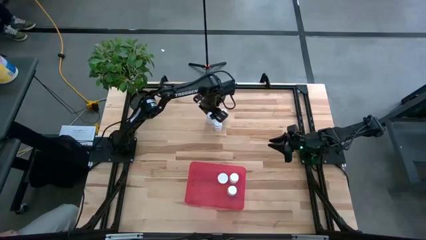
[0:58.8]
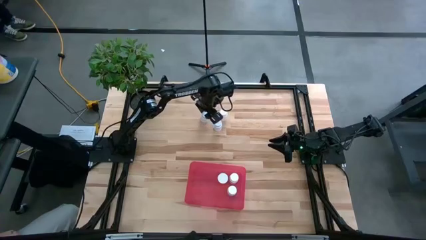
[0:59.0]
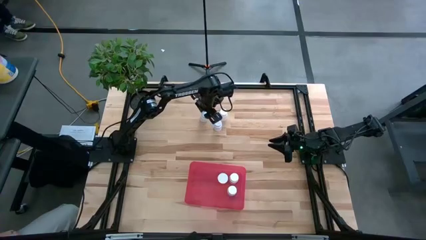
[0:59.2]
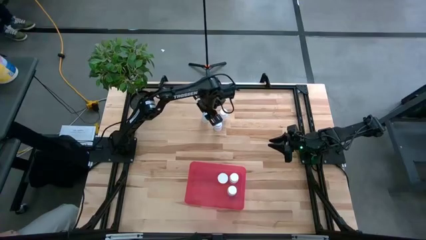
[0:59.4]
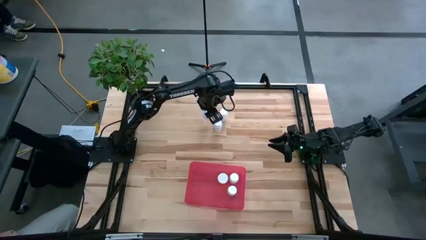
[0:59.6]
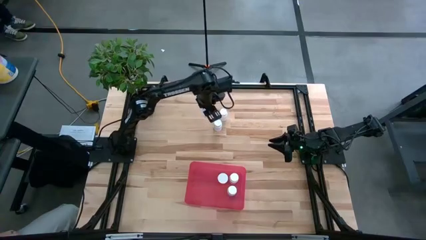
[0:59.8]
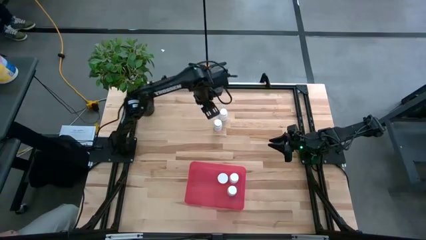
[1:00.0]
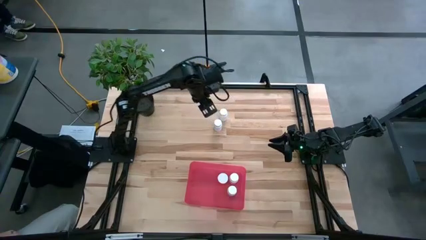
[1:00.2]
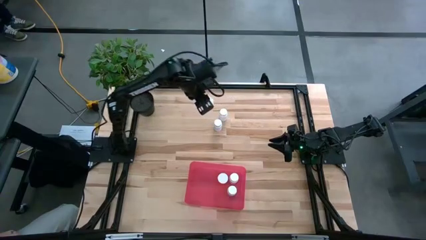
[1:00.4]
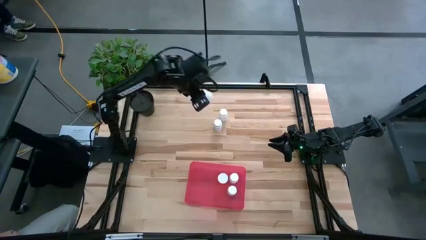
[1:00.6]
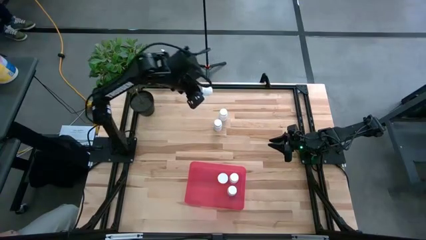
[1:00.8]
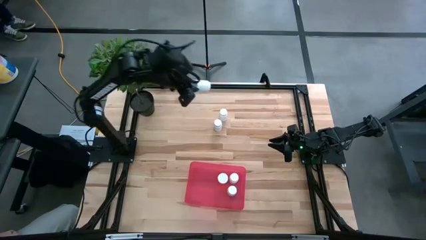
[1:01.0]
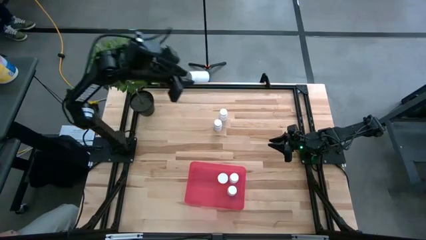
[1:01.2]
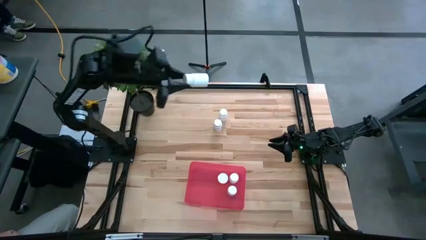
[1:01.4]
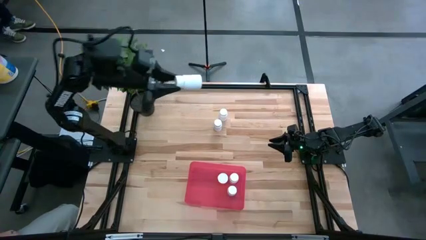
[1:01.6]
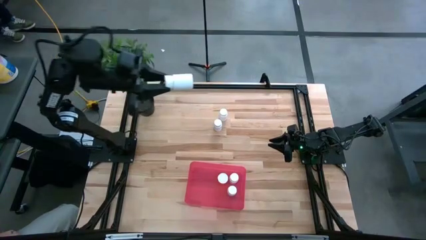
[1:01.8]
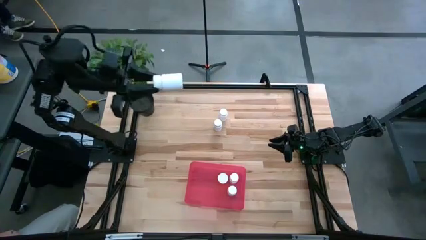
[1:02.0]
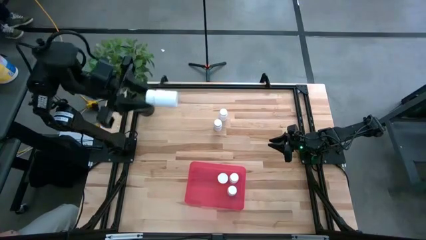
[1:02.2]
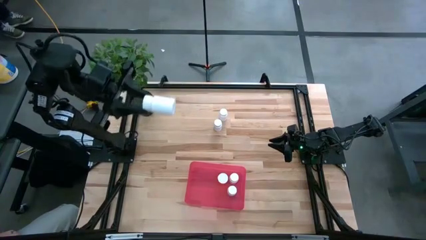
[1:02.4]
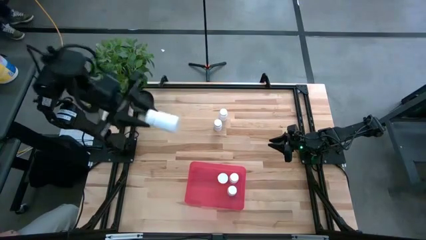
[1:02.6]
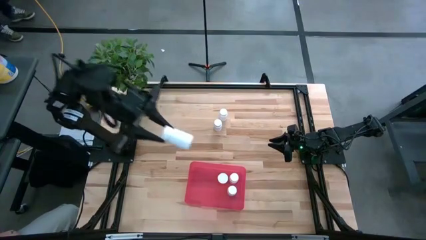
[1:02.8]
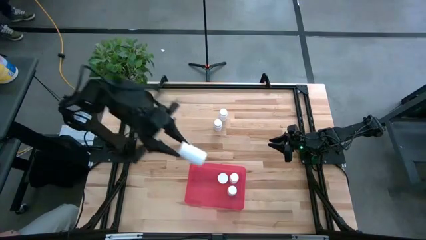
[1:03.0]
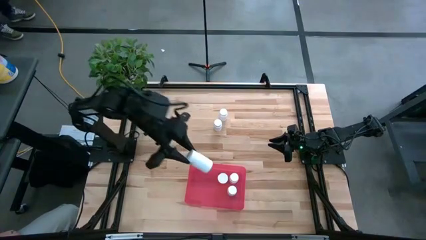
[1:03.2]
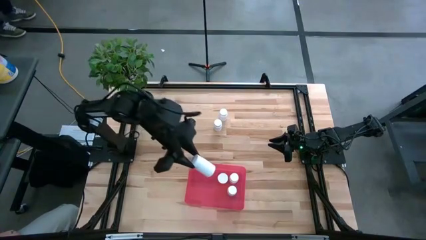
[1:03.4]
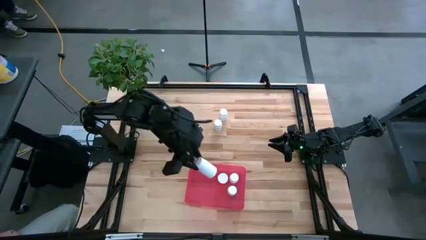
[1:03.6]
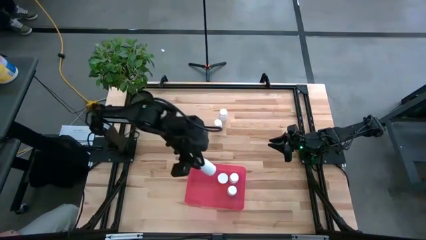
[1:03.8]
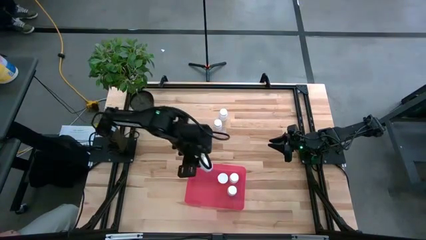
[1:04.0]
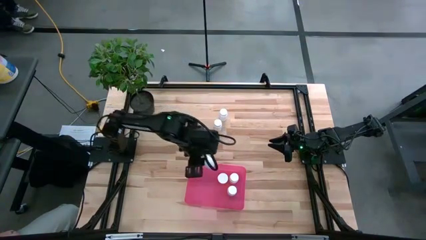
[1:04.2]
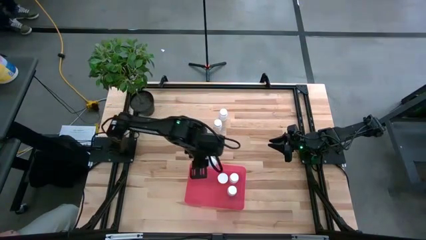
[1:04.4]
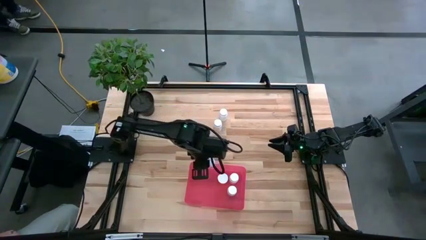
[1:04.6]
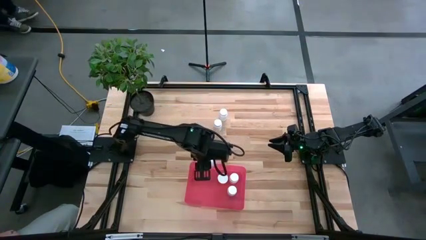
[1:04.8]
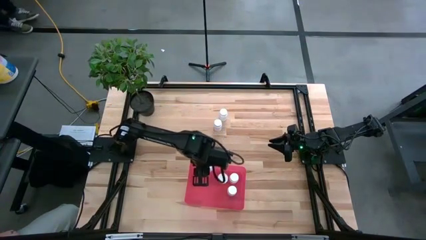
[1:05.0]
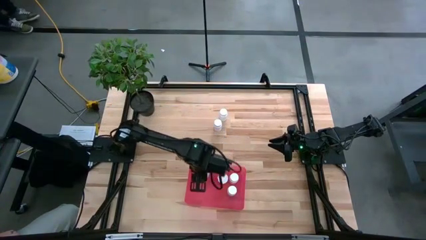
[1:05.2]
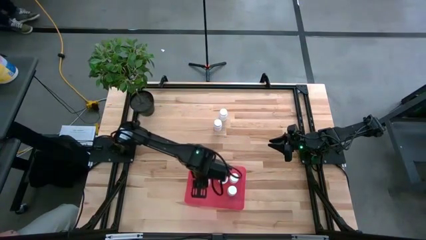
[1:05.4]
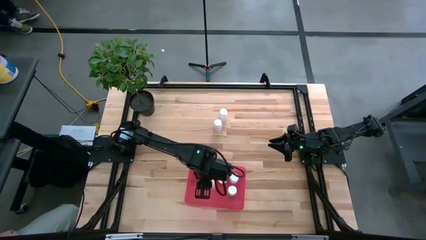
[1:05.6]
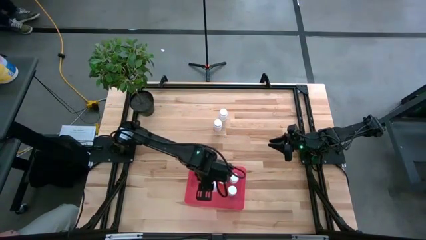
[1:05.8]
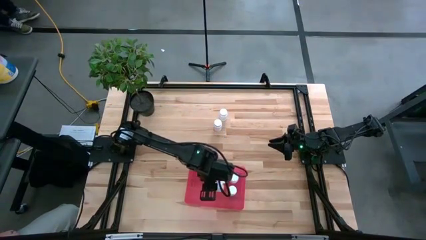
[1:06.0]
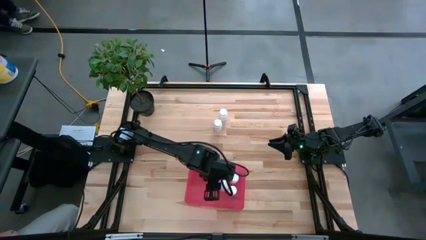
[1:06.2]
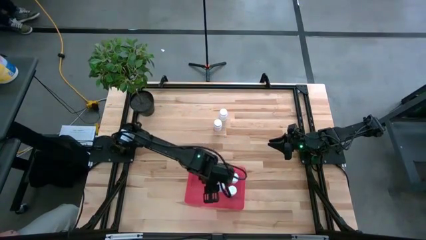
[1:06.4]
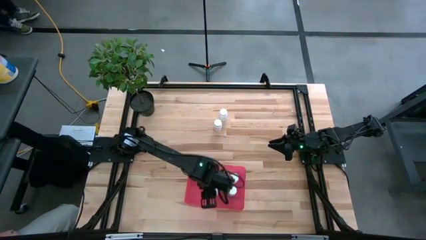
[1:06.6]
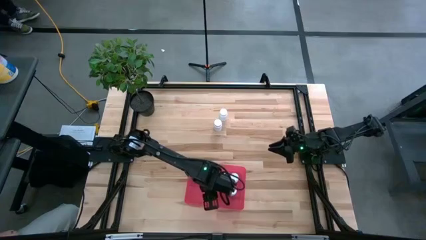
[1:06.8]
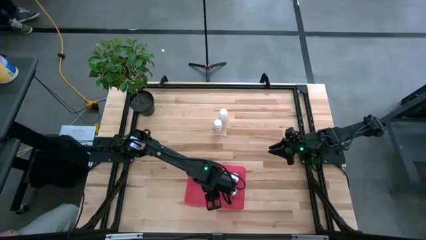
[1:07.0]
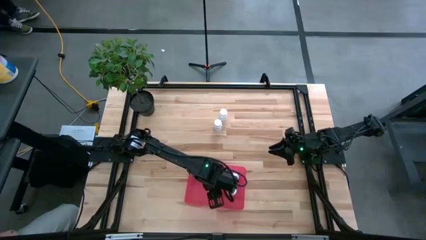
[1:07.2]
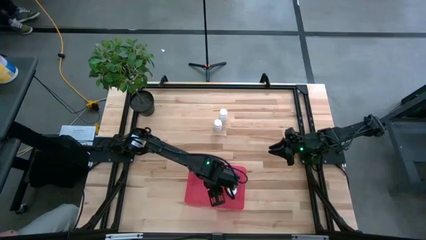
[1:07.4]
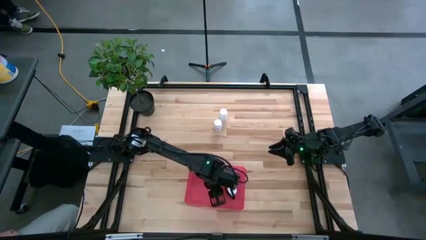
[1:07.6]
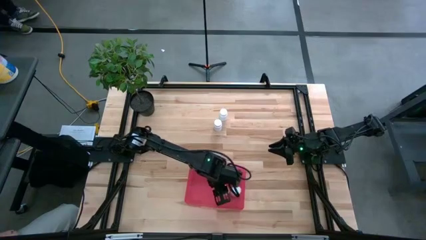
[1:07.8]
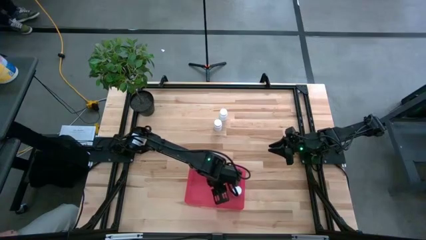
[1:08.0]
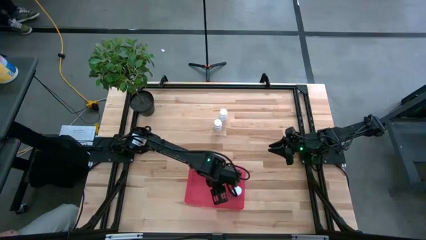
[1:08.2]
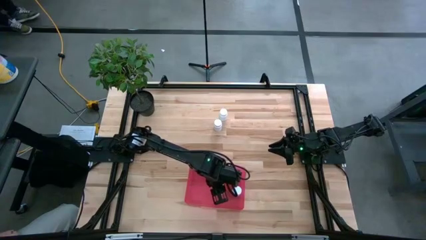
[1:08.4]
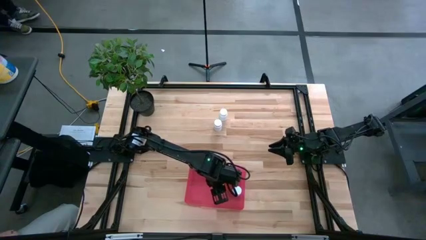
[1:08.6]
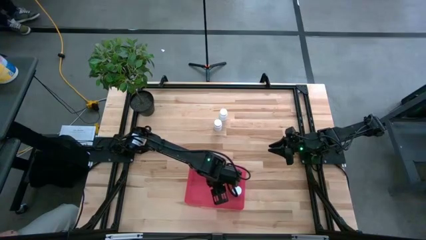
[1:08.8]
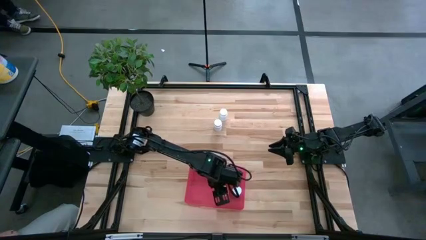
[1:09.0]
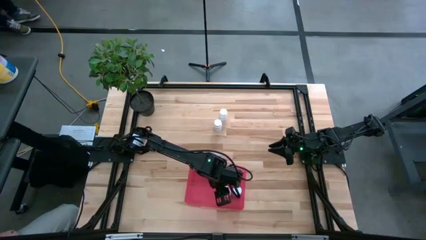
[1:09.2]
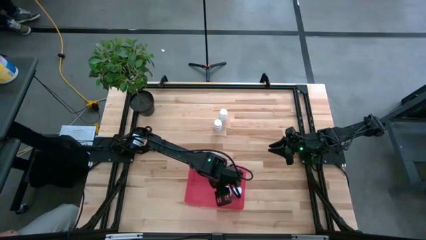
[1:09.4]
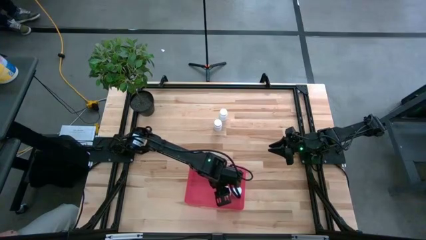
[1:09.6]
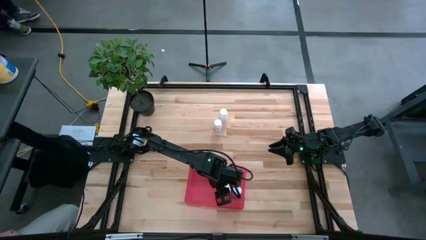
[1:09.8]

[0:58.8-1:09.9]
Task: Pick and place pill bottles into a basket
Put the white pill bottle into the red bin
